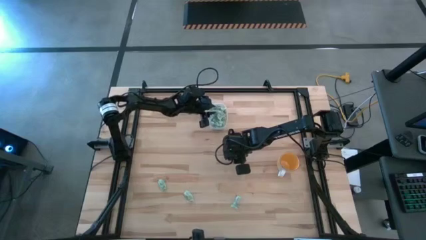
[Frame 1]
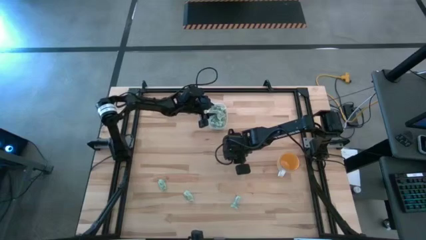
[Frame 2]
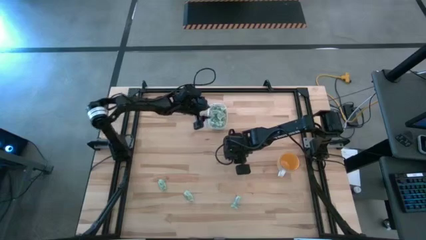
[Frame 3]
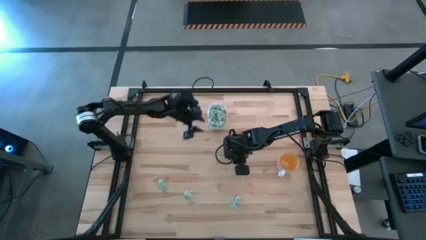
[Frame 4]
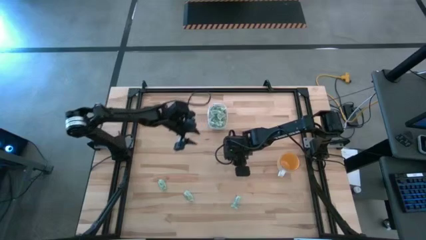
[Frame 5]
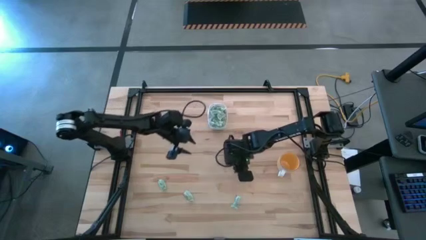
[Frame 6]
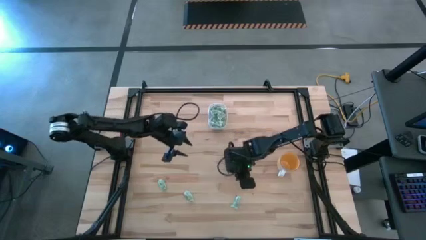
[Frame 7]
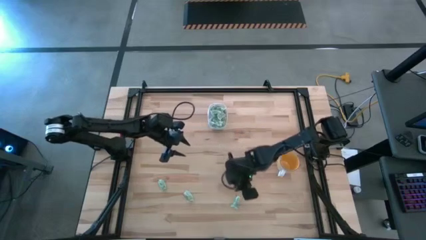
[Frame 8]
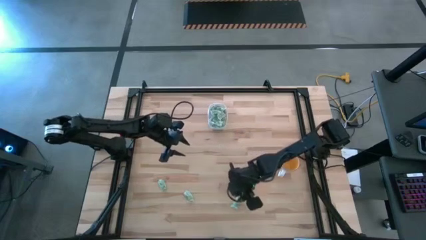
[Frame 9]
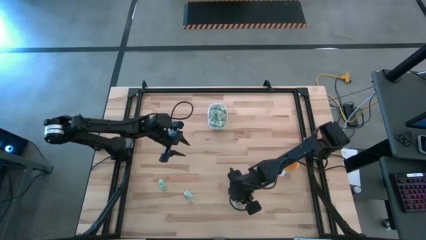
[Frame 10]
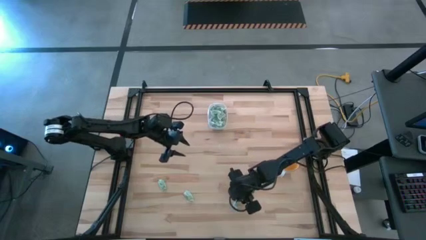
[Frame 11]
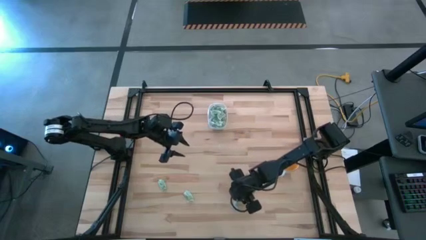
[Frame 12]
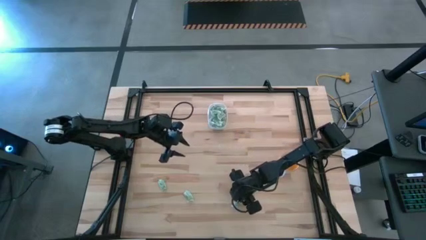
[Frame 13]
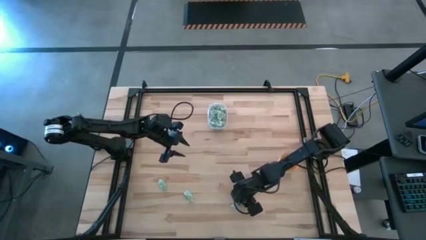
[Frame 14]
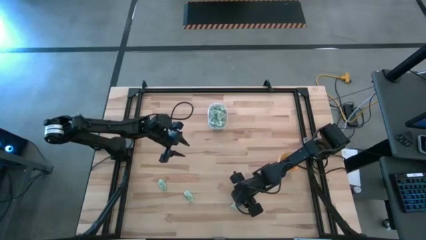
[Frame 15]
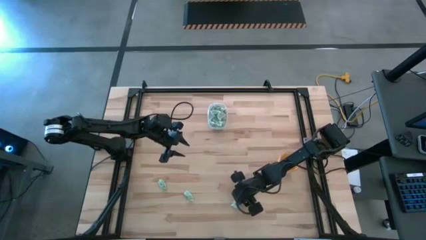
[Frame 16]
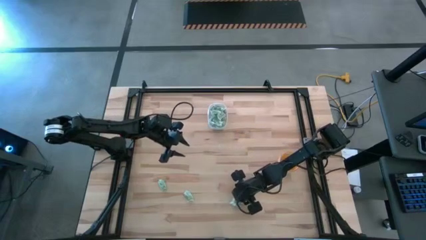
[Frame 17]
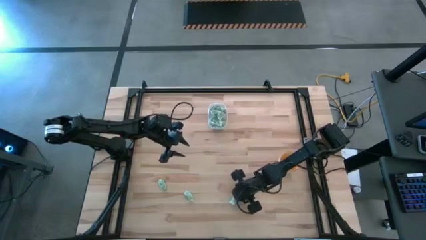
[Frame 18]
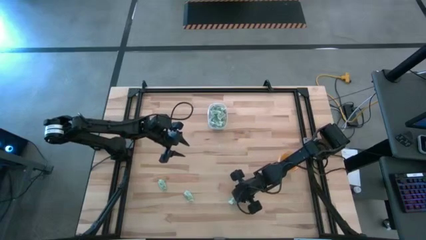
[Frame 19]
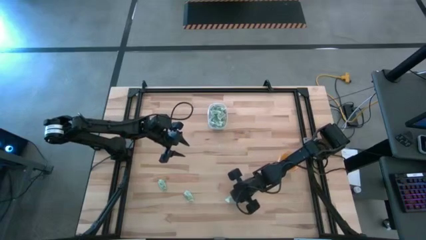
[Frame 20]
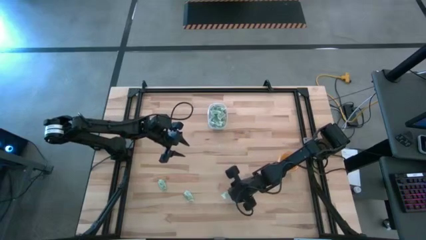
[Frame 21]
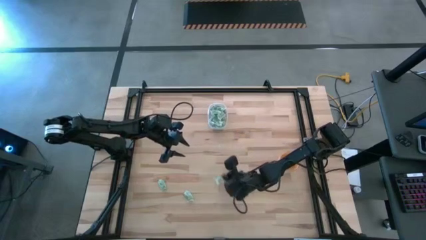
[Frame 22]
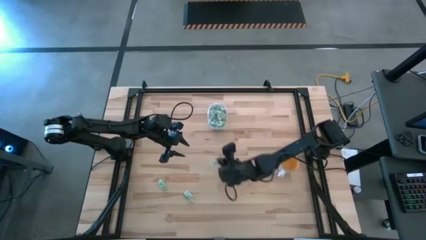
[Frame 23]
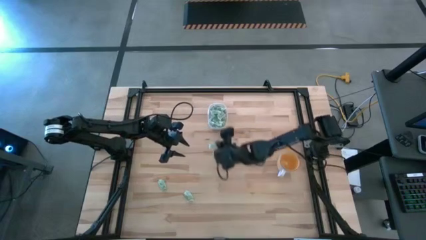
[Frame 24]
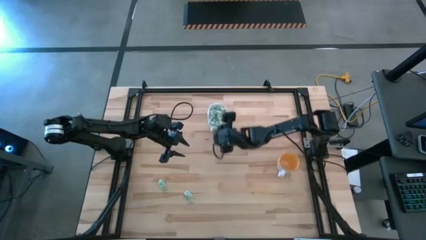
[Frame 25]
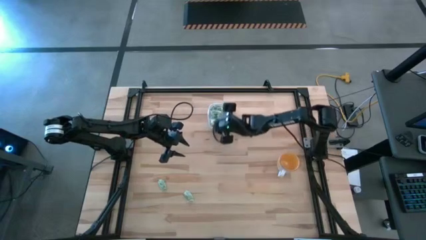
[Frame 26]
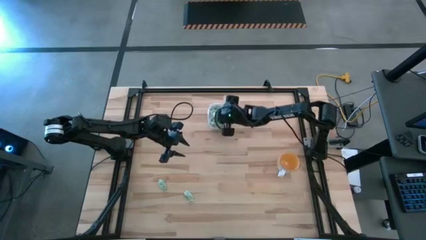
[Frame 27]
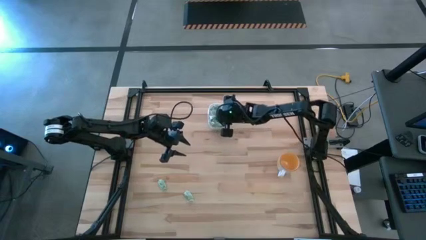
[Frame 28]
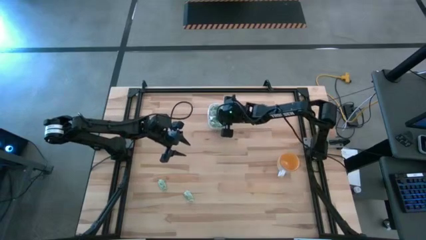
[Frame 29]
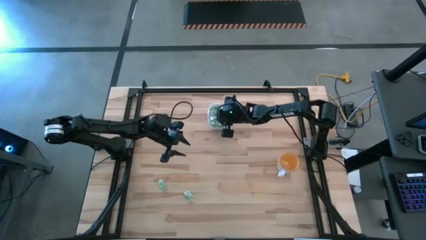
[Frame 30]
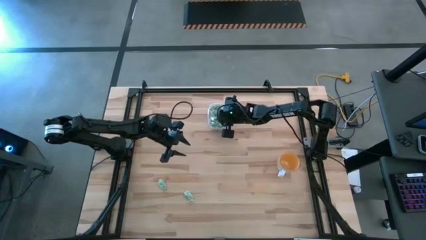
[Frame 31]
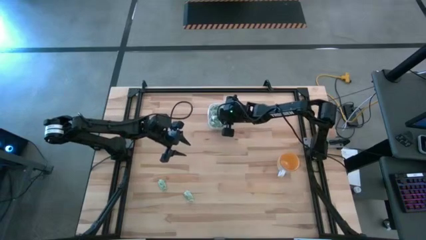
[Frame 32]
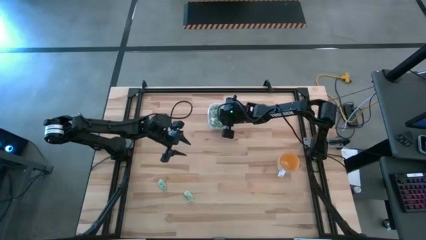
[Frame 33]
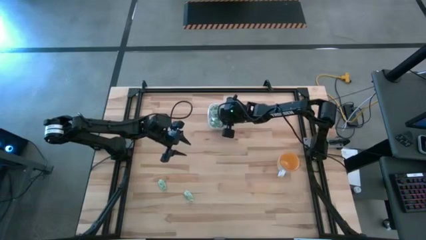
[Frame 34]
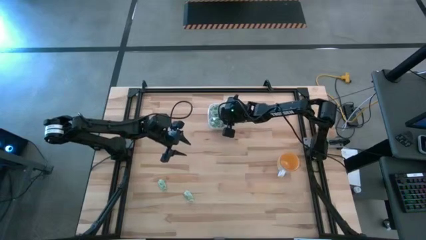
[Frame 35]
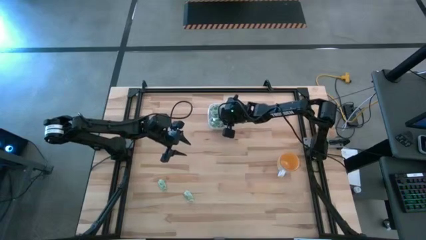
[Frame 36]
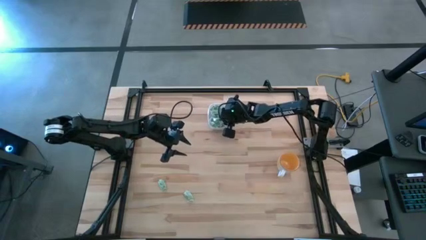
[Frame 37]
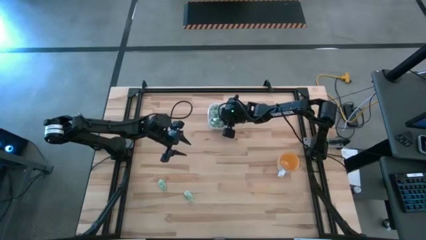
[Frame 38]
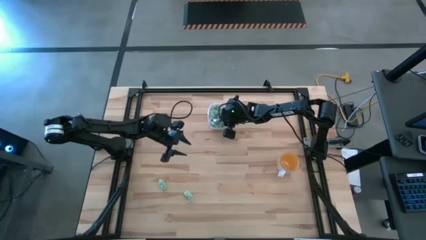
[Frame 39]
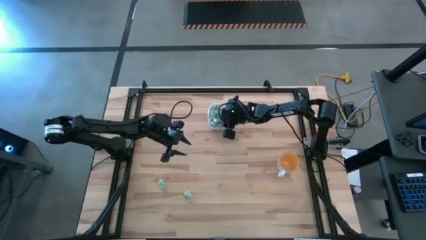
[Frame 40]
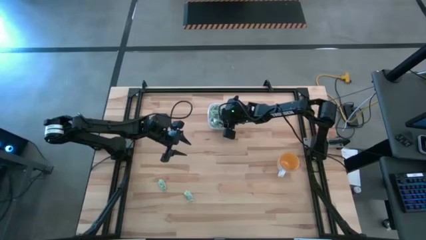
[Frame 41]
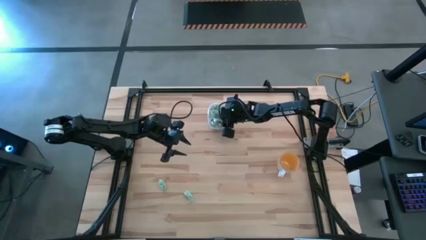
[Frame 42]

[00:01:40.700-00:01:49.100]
Task: Pick and place Stevia / Truvia into bins
Put the right green stevia packet into the transparent bin

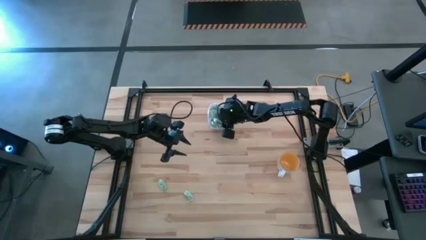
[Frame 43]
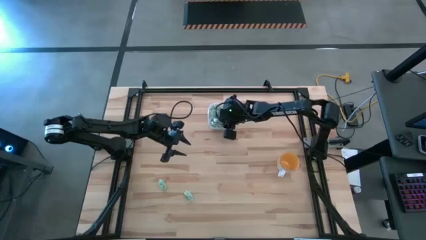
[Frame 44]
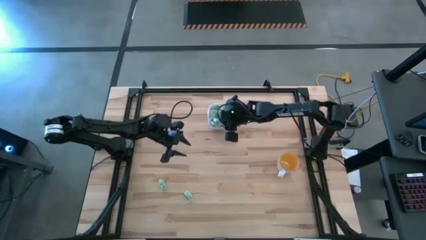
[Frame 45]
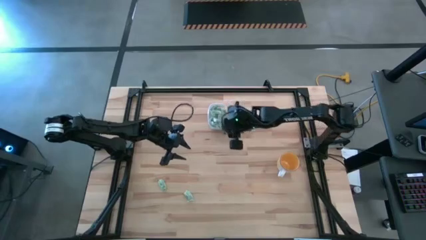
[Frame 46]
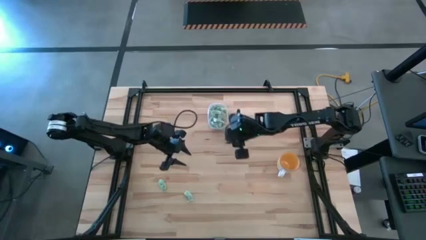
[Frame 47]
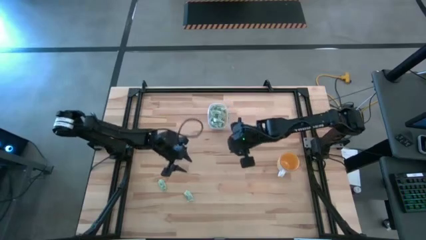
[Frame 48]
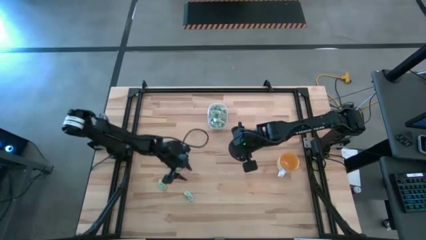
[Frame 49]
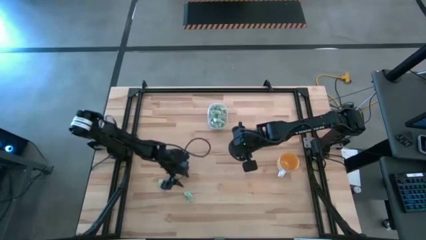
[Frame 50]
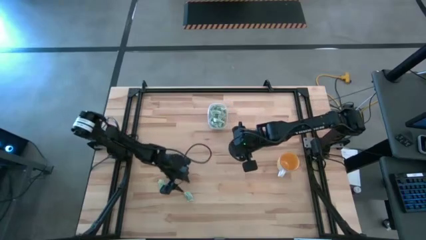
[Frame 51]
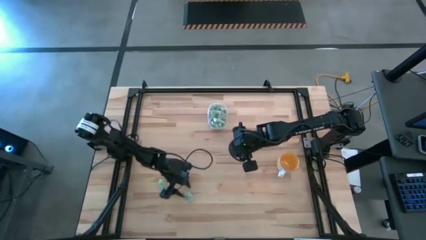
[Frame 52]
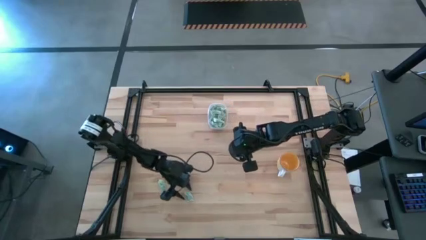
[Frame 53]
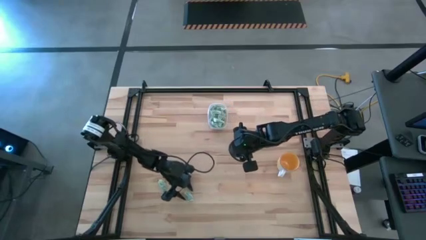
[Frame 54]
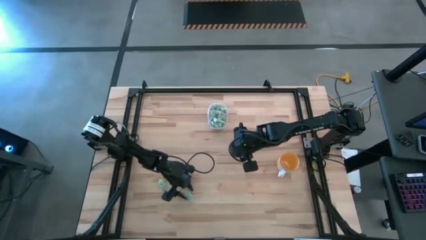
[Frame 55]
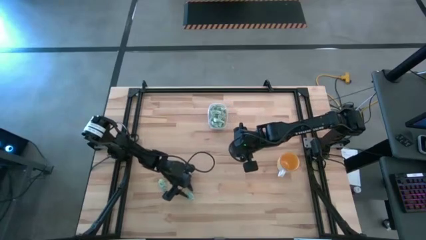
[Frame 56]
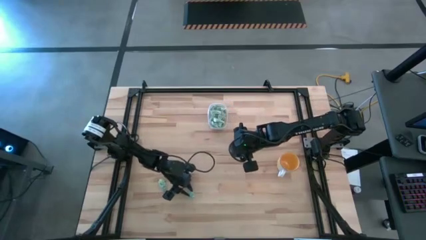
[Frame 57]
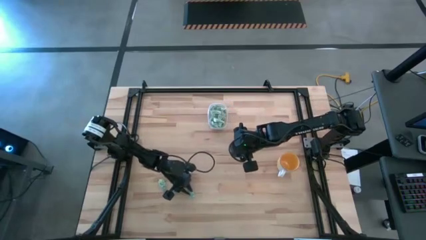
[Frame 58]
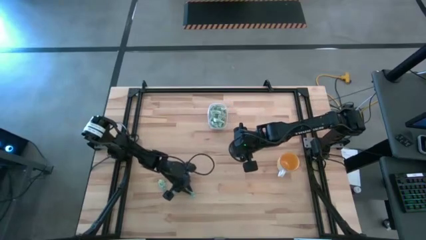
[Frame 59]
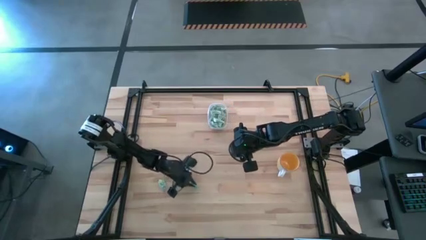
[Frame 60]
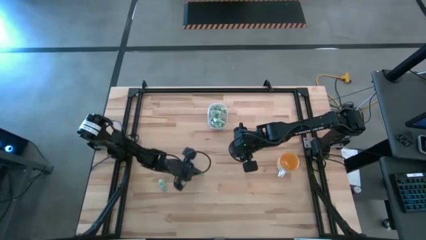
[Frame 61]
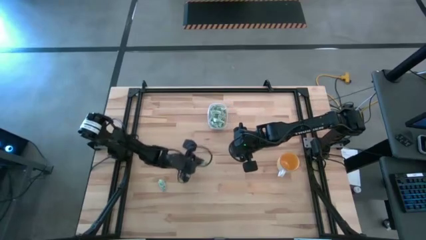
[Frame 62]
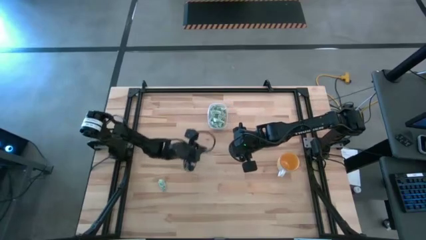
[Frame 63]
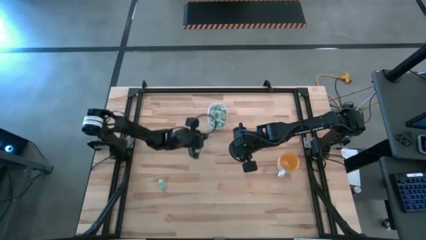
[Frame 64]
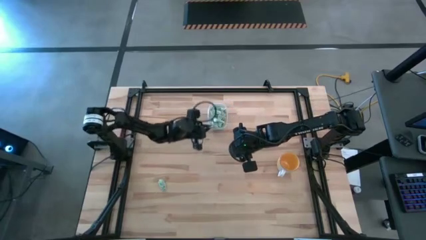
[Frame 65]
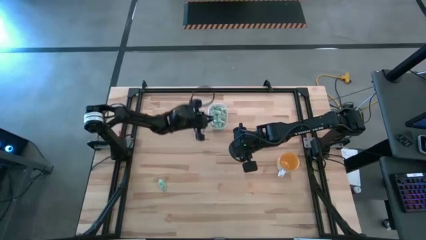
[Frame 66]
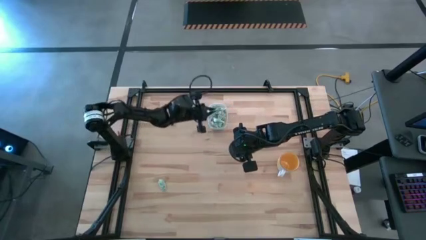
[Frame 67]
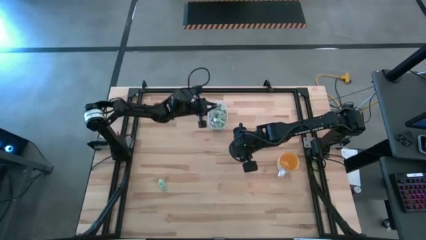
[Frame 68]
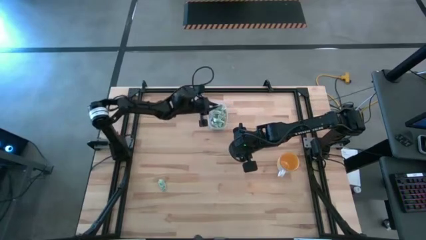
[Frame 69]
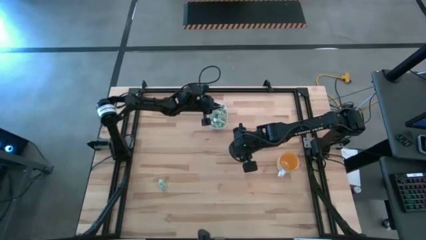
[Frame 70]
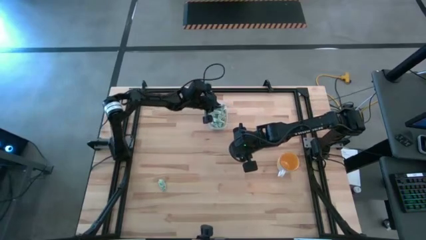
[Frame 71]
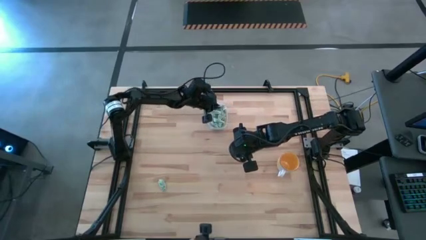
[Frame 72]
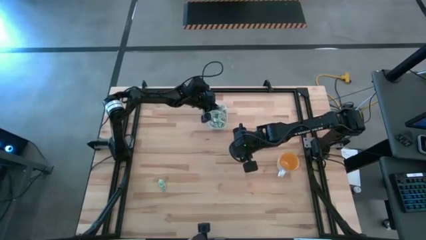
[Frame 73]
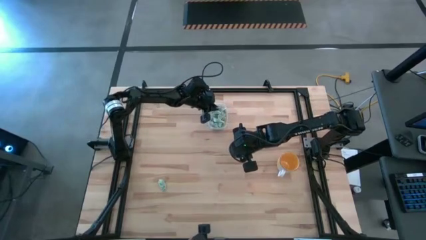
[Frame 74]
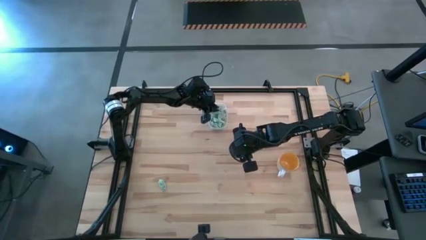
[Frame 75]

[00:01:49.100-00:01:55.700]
Put the right green stevia packet into the transparent bin

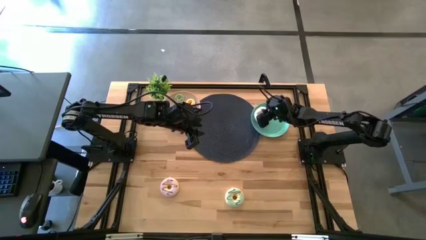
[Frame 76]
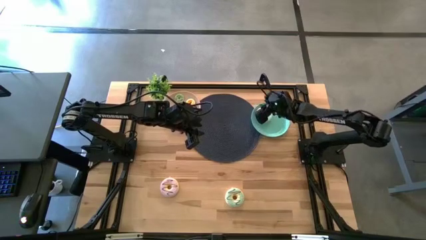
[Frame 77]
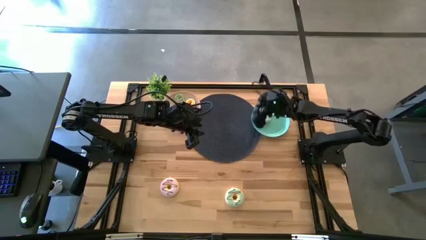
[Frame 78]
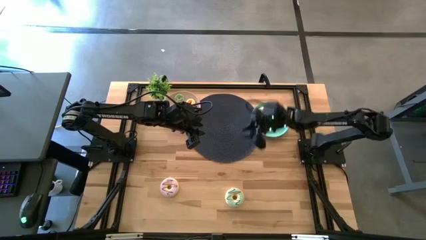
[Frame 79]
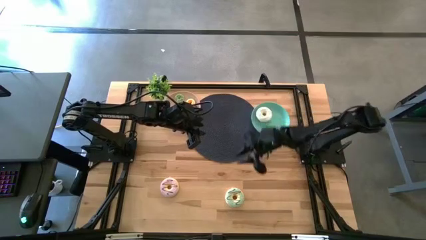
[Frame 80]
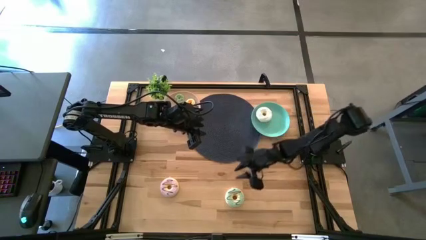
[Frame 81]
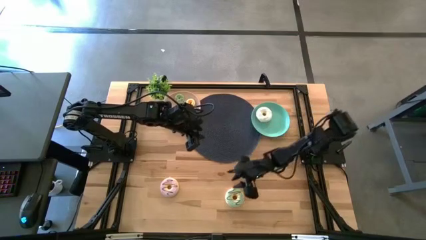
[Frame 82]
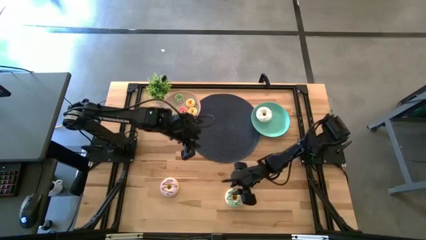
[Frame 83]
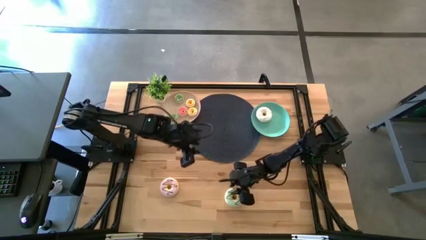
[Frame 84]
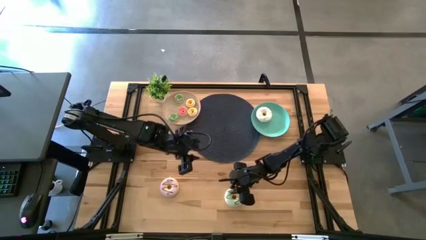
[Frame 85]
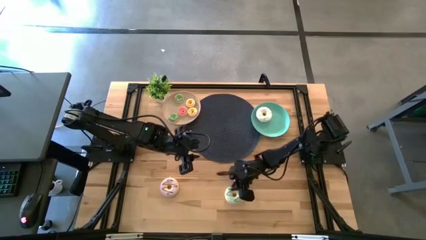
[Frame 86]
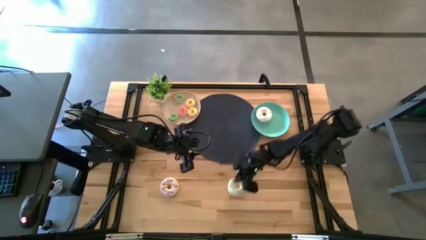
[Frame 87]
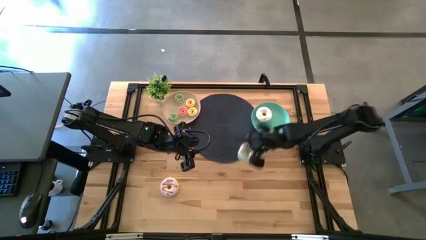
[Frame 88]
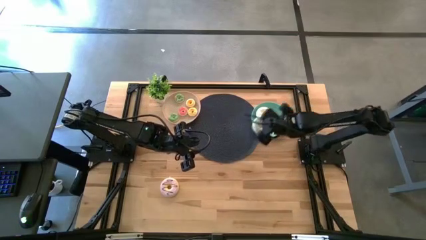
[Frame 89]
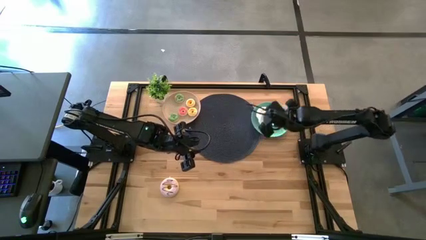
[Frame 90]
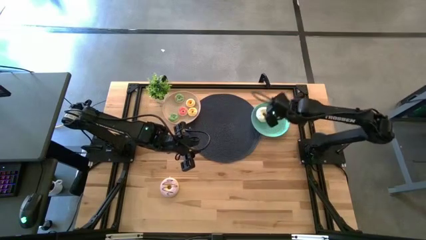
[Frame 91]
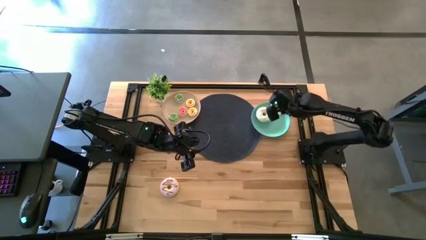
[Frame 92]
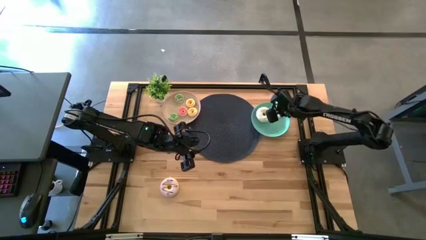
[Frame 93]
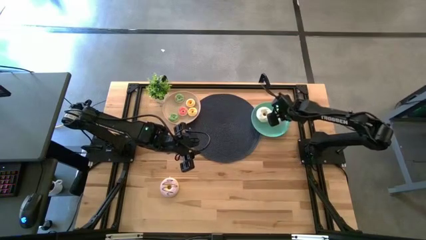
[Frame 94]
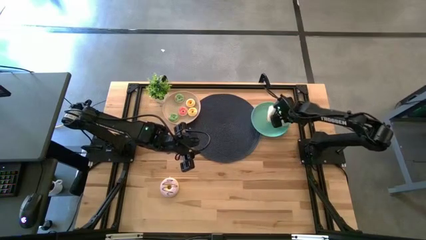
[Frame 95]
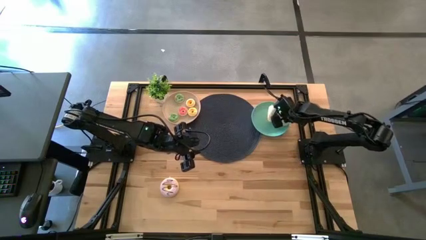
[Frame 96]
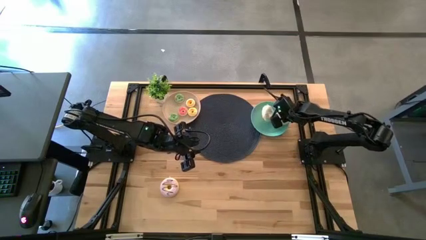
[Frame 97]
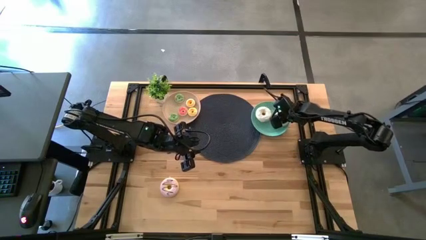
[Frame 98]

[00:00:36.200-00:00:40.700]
Task: Pick & Place donuts
Put the large light green donut on the green plate
